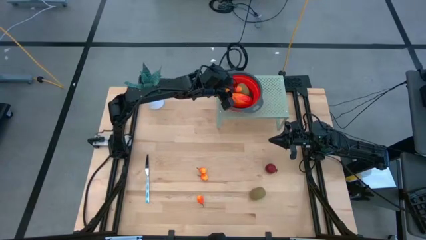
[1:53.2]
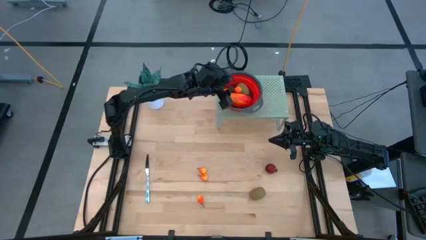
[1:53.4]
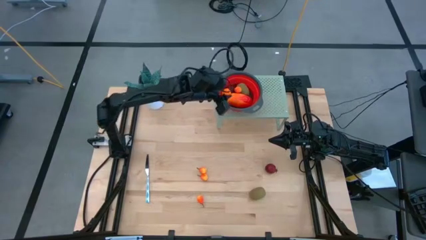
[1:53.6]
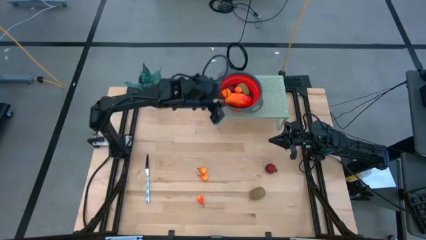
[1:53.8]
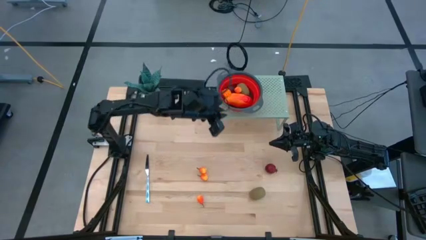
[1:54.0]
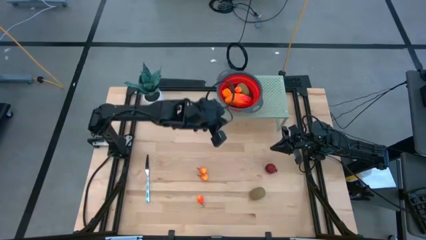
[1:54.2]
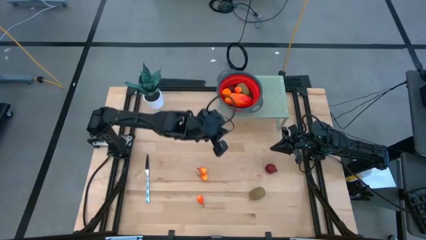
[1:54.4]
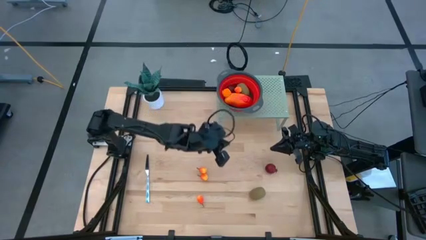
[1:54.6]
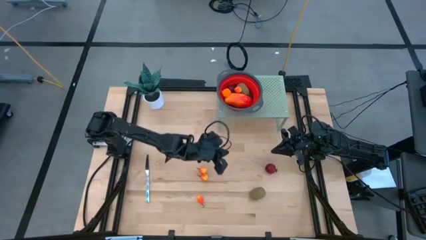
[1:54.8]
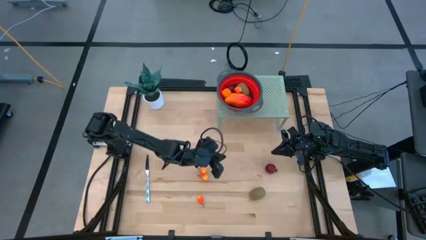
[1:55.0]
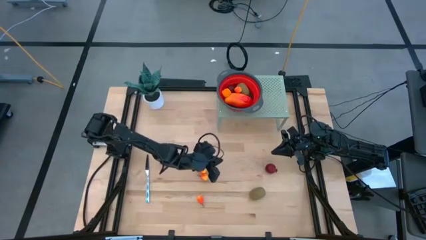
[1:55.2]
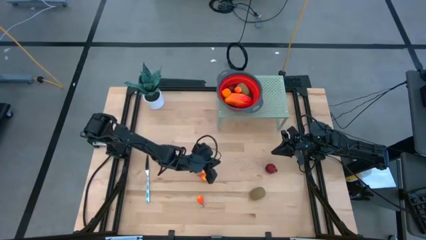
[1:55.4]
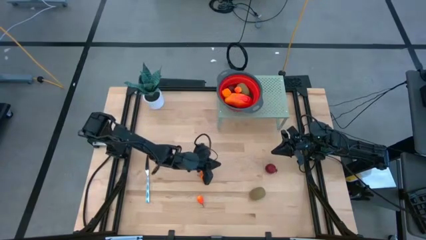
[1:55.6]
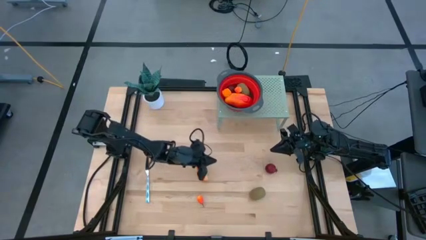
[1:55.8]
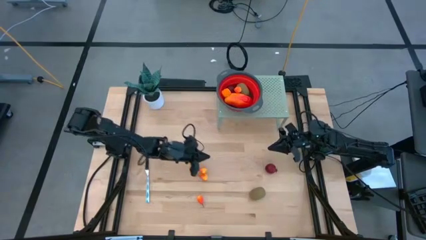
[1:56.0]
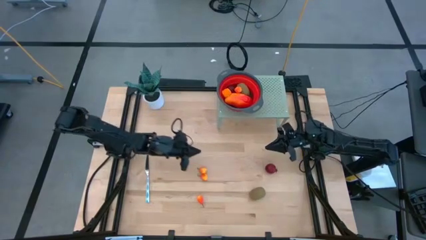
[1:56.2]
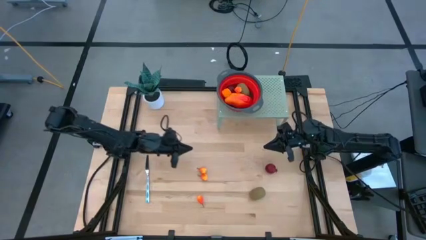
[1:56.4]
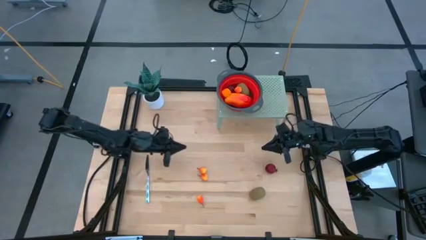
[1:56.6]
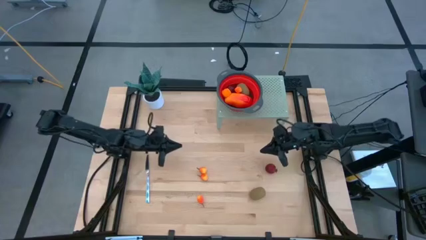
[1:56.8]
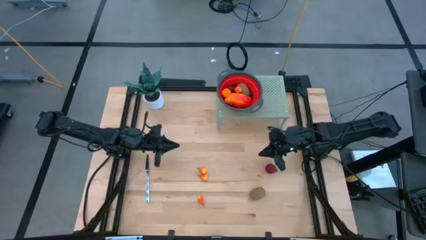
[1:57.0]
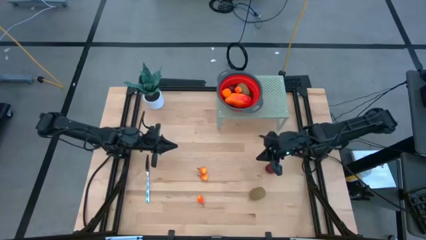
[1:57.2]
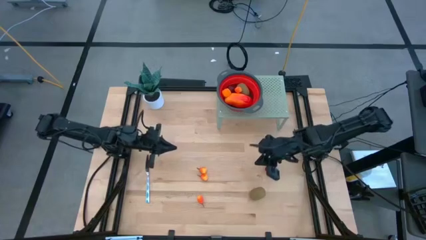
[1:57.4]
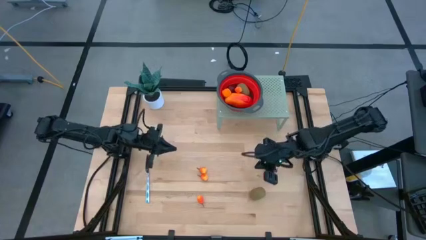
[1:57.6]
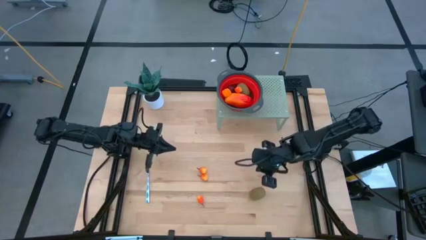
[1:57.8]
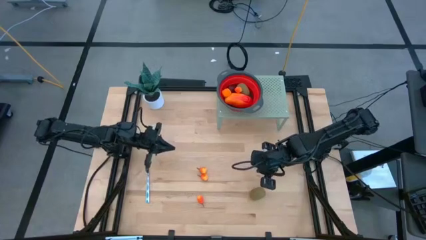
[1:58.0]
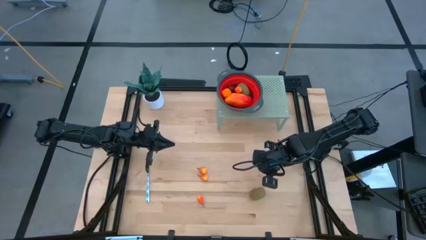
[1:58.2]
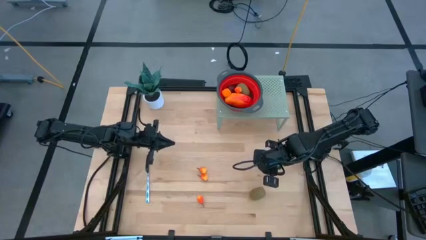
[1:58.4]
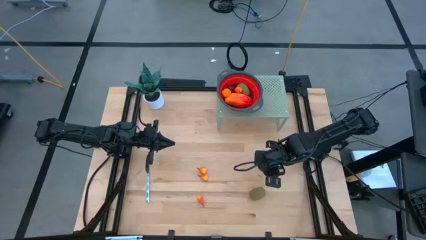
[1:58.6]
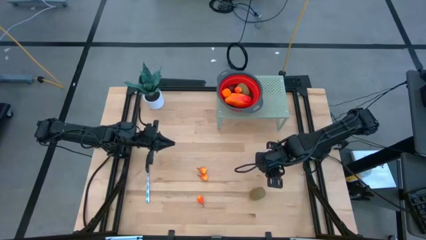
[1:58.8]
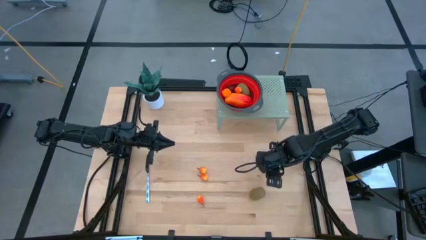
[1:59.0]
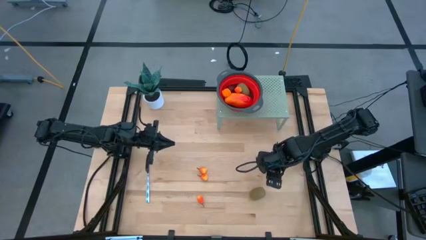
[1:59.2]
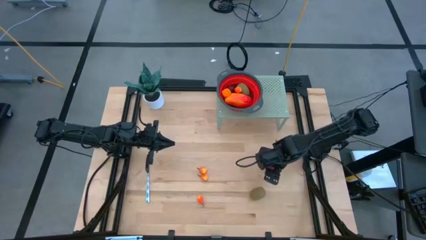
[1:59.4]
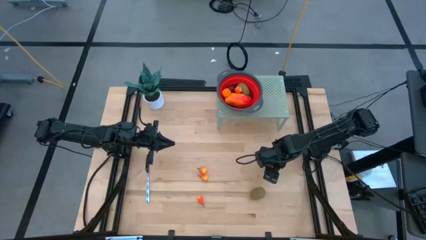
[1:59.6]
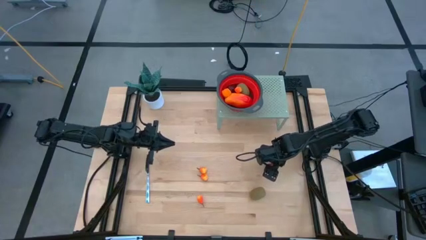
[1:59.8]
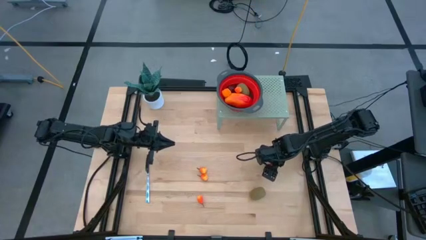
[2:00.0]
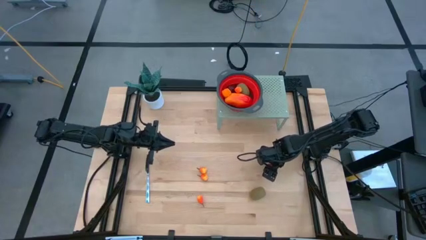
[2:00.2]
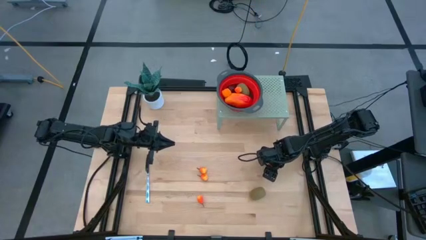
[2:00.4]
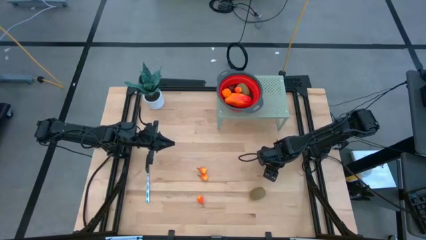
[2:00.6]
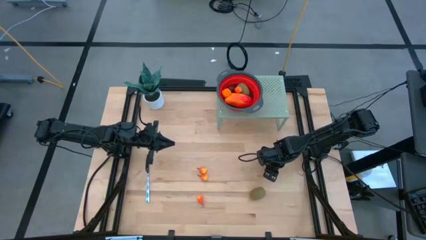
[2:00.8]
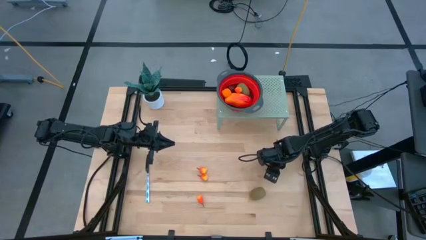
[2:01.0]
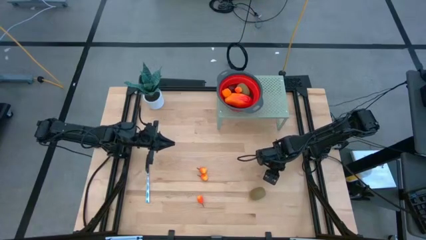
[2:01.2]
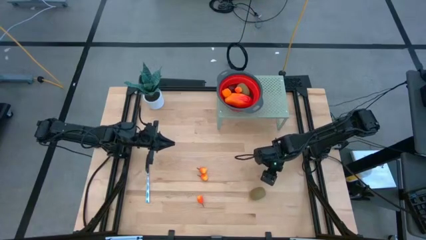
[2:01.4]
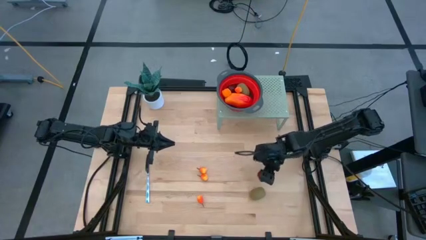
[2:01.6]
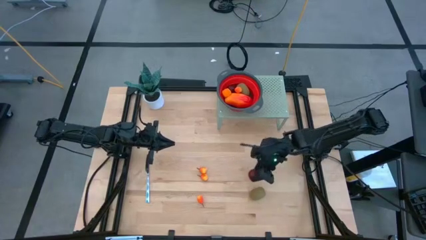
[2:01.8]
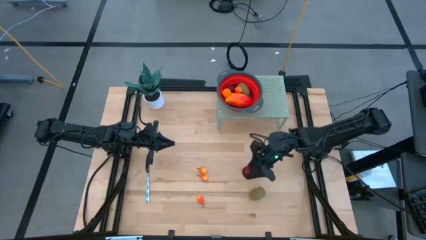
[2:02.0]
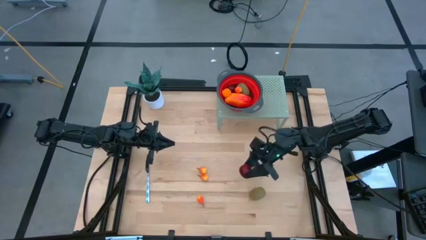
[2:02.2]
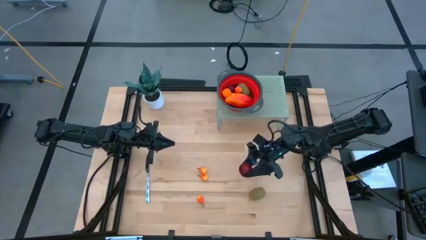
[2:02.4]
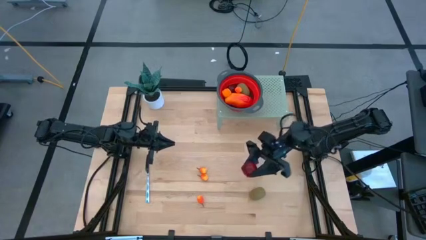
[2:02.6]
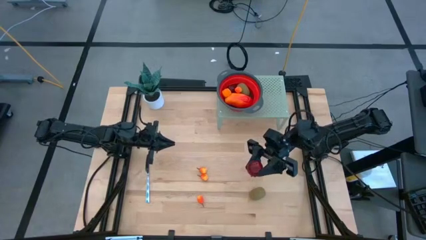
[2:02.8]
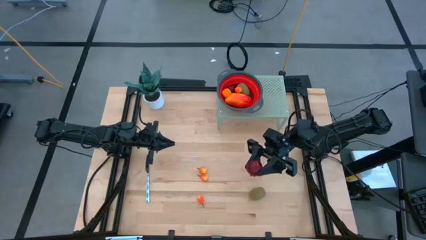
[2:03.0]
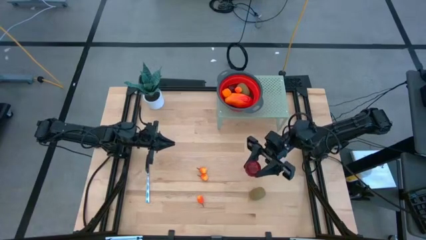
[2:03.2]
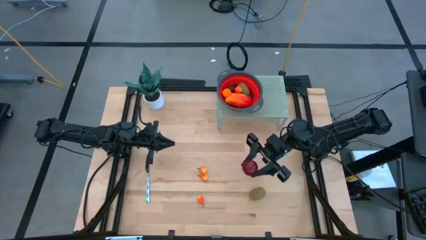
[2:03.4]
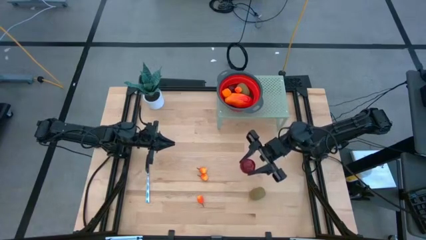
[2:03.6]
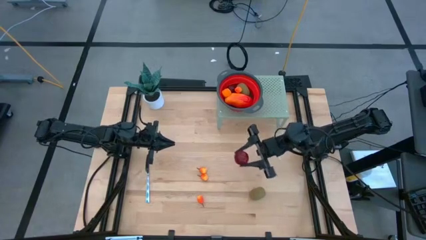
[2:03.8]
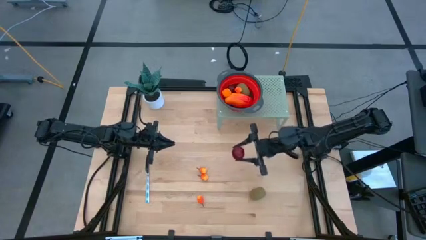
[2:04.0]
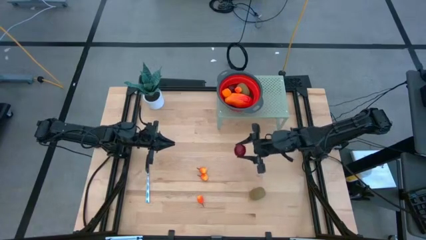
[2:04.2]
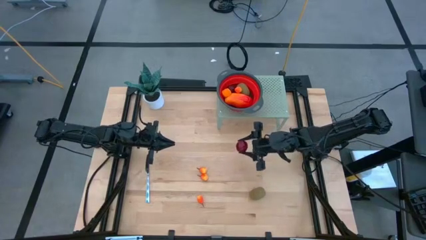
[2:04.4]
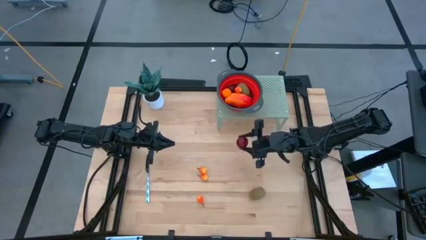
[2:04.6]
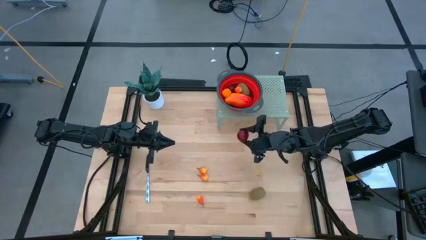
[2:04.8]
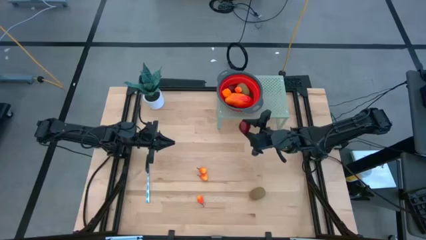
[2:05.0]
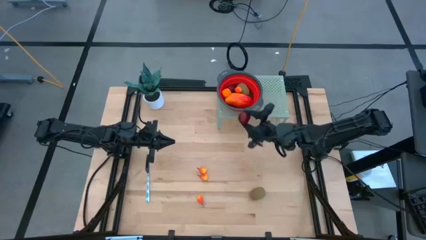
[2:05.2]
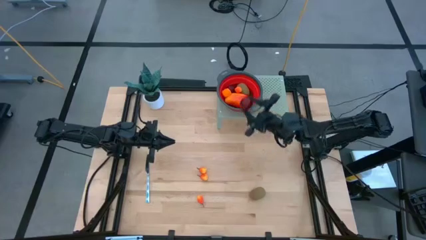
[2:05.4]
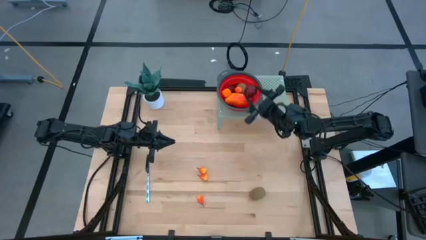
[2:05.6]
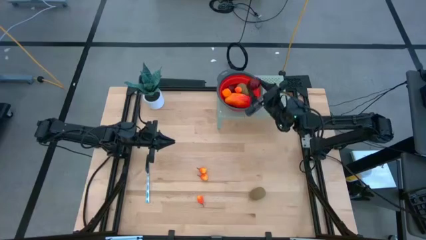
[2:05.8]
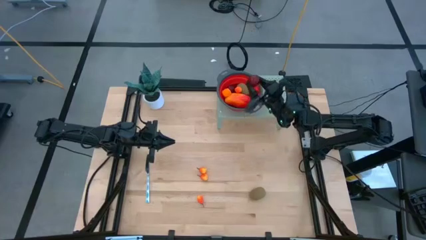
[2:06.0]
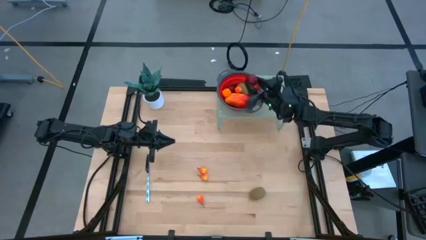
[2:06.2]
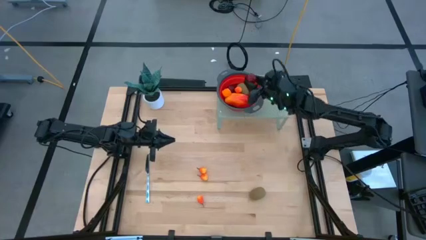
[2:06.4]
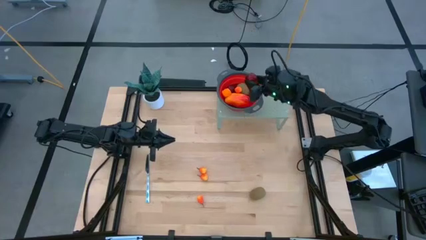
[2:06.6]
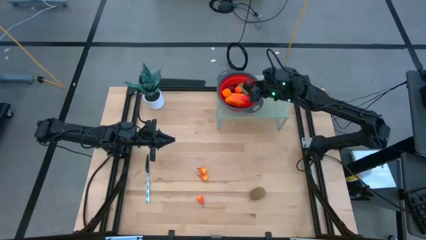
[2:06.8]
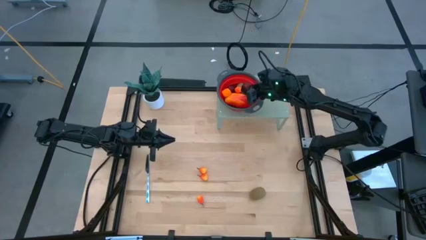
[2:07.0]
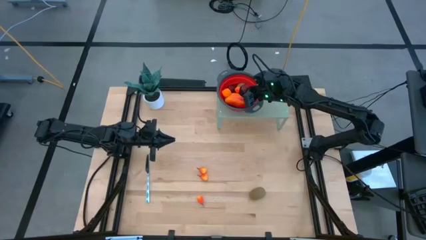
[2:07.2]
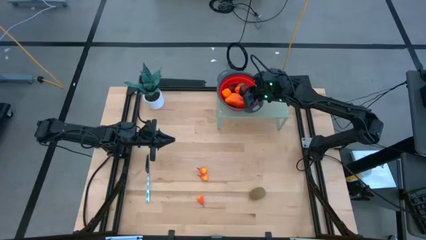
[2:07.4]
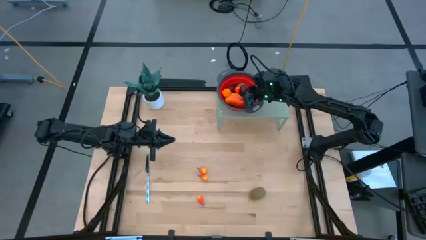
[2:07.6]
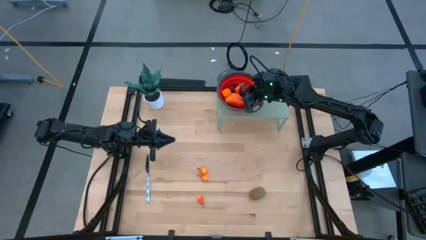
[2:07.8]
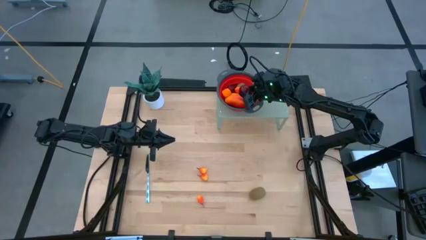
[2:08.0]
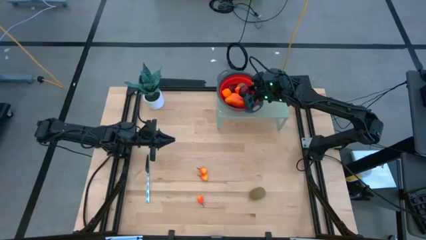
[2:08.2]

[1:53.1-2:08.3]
Task: Pick & Place Fruit
Put the red pomegranate into the red strainer bowl on the shelf
